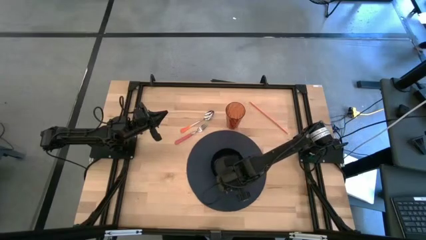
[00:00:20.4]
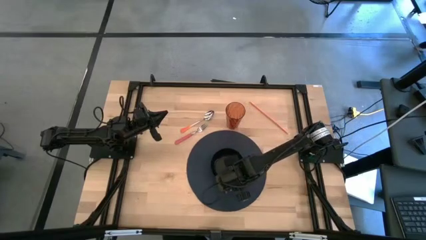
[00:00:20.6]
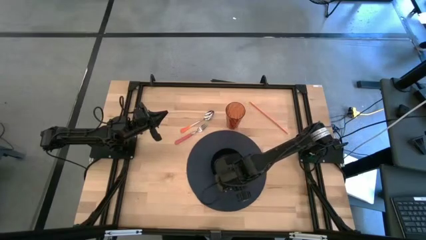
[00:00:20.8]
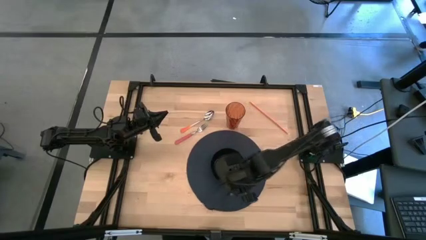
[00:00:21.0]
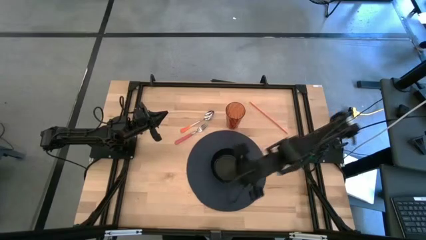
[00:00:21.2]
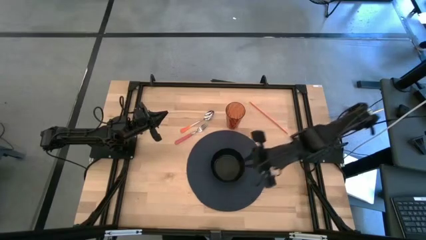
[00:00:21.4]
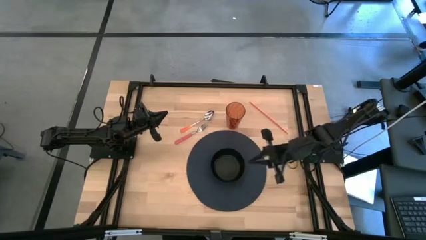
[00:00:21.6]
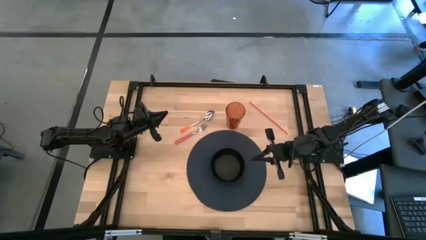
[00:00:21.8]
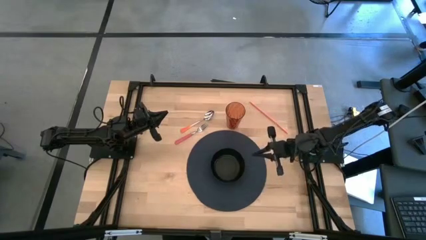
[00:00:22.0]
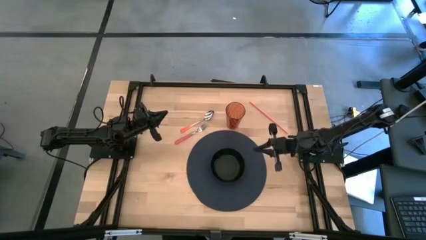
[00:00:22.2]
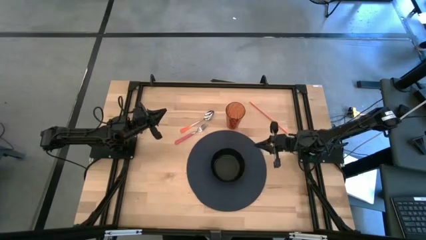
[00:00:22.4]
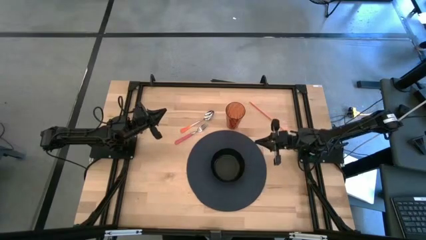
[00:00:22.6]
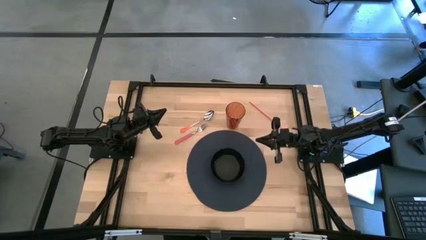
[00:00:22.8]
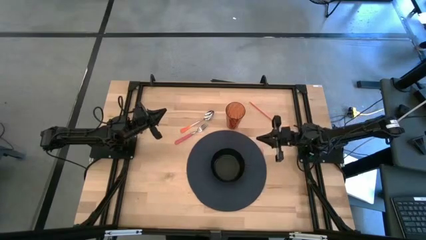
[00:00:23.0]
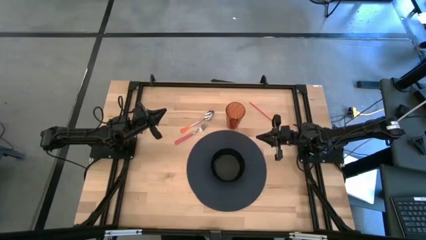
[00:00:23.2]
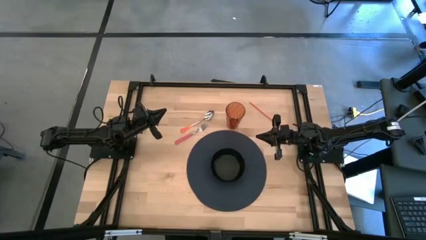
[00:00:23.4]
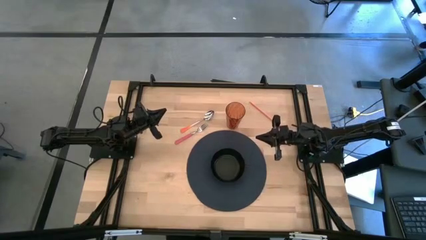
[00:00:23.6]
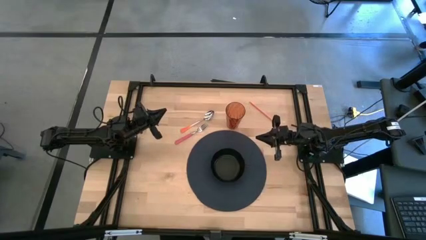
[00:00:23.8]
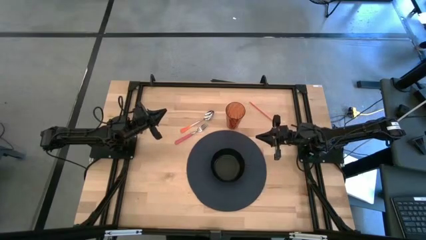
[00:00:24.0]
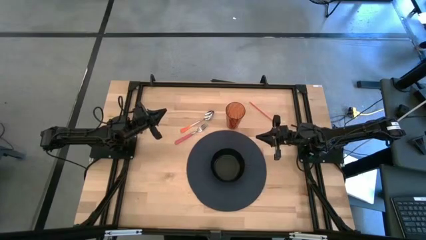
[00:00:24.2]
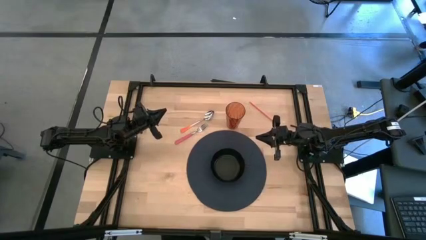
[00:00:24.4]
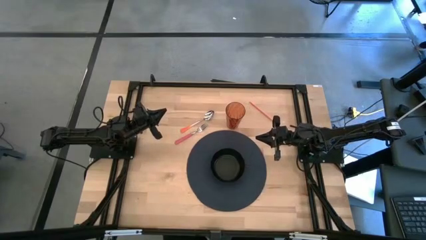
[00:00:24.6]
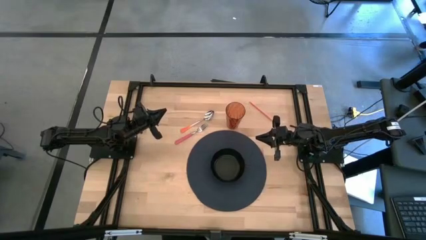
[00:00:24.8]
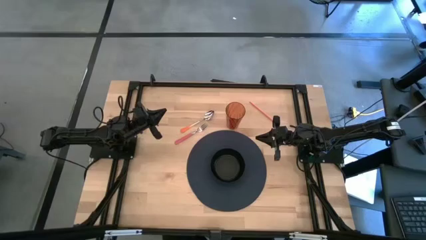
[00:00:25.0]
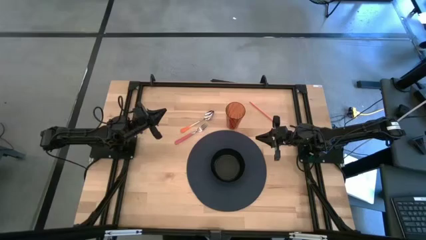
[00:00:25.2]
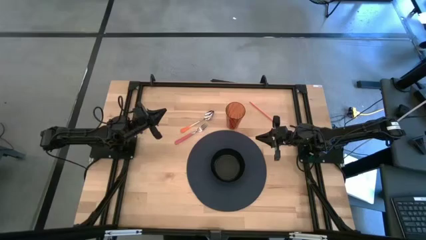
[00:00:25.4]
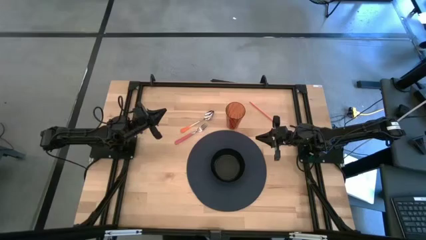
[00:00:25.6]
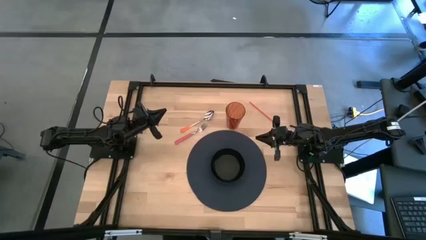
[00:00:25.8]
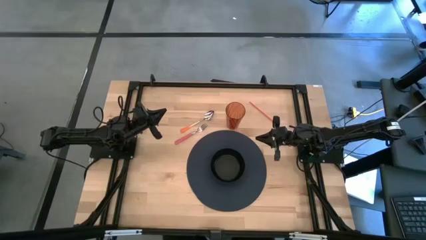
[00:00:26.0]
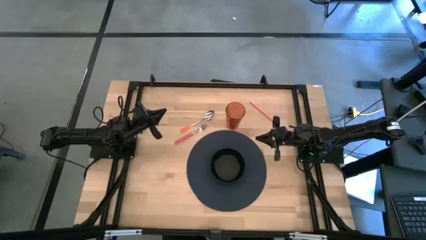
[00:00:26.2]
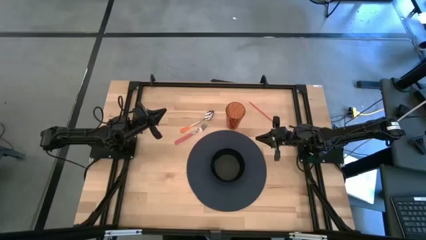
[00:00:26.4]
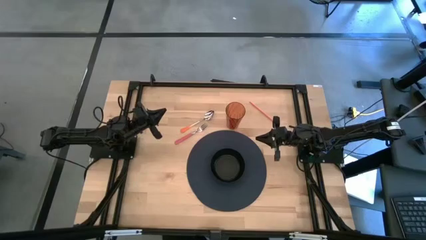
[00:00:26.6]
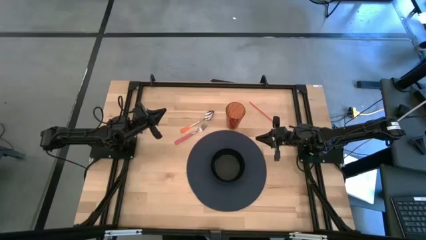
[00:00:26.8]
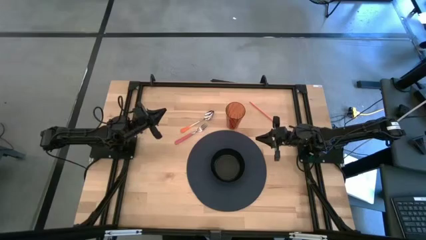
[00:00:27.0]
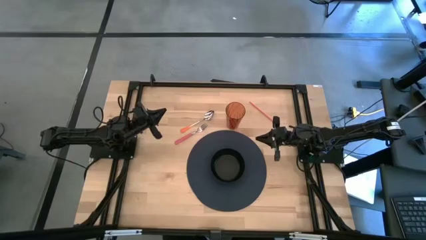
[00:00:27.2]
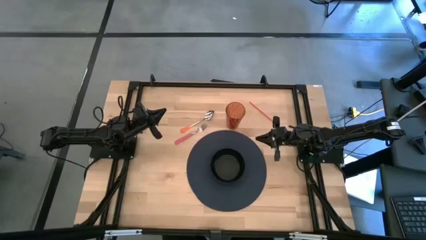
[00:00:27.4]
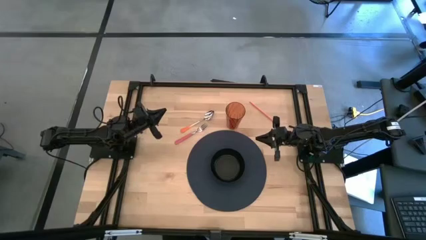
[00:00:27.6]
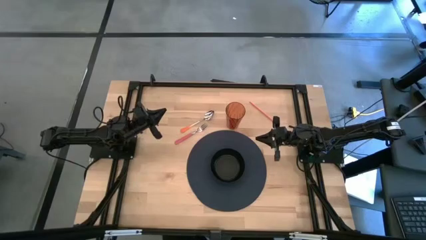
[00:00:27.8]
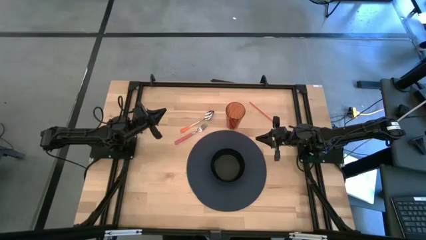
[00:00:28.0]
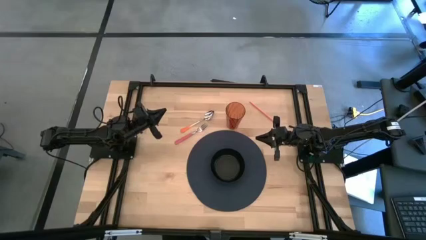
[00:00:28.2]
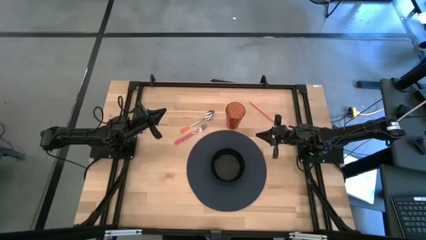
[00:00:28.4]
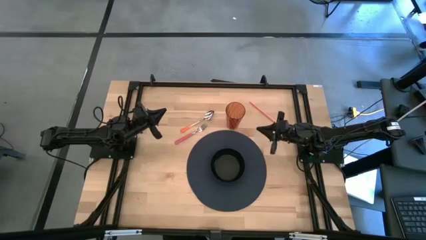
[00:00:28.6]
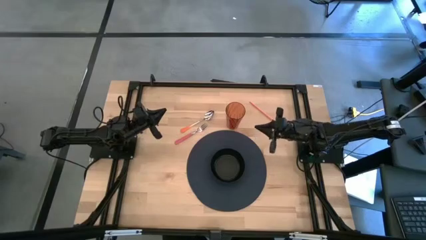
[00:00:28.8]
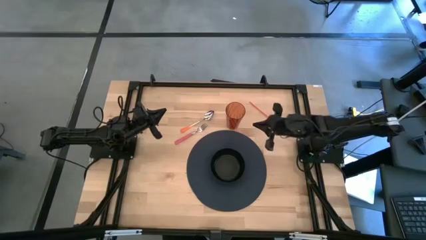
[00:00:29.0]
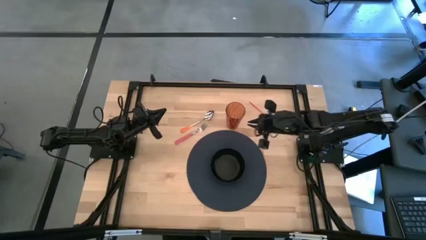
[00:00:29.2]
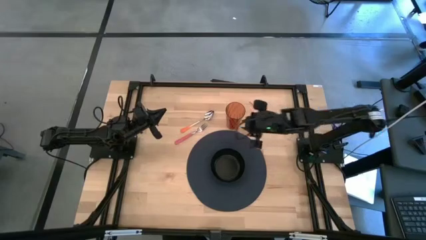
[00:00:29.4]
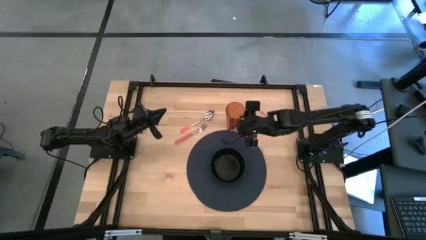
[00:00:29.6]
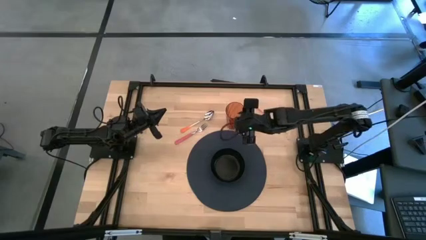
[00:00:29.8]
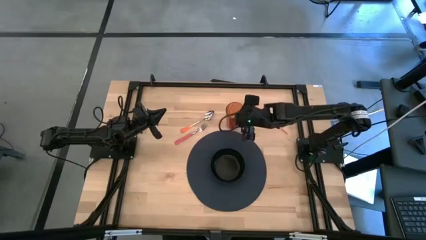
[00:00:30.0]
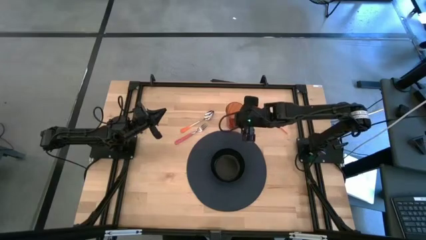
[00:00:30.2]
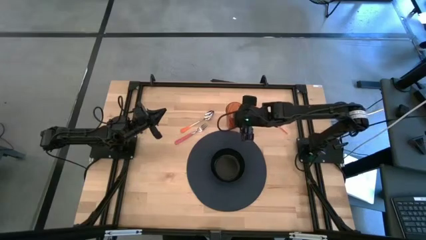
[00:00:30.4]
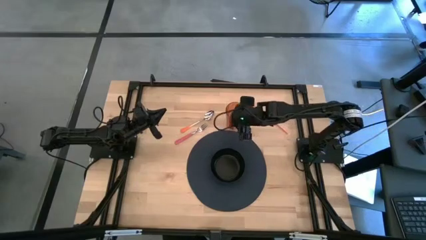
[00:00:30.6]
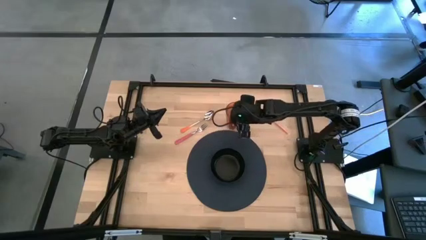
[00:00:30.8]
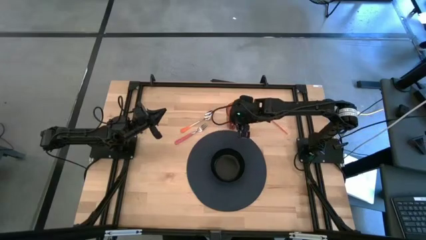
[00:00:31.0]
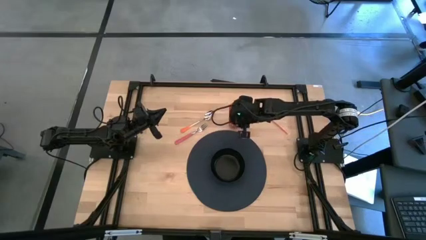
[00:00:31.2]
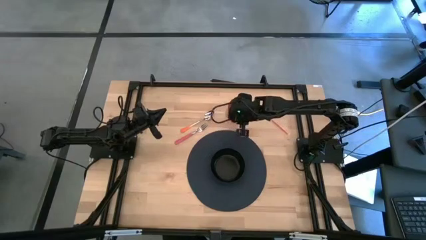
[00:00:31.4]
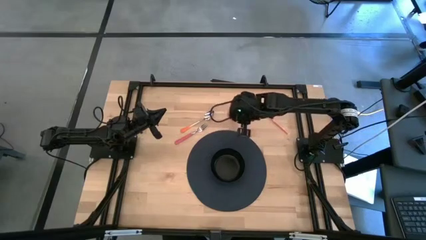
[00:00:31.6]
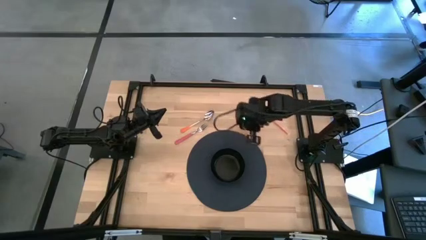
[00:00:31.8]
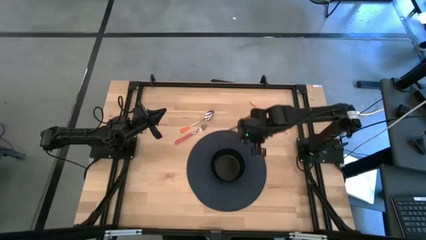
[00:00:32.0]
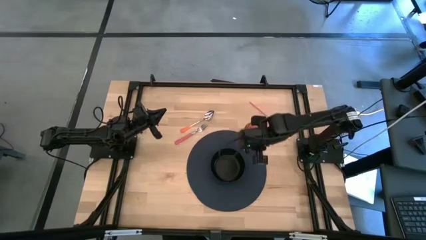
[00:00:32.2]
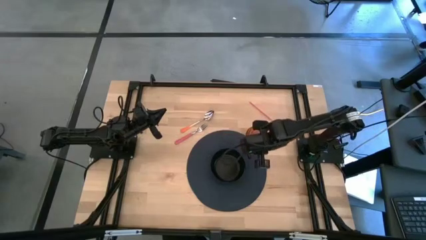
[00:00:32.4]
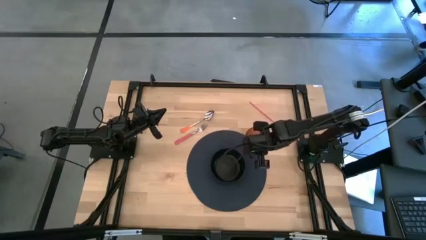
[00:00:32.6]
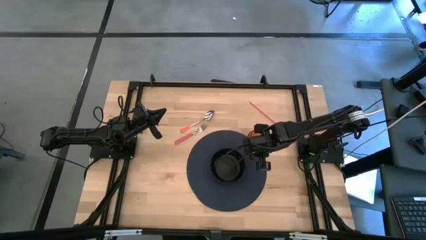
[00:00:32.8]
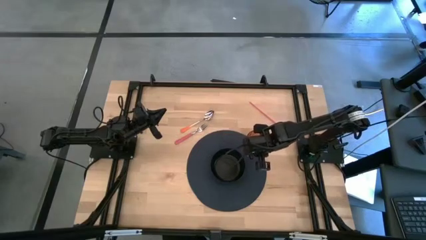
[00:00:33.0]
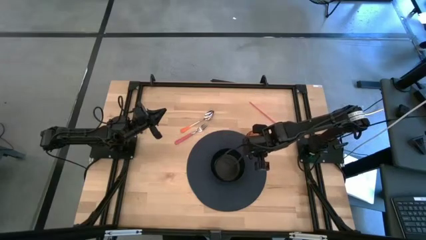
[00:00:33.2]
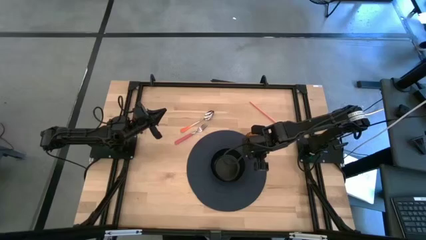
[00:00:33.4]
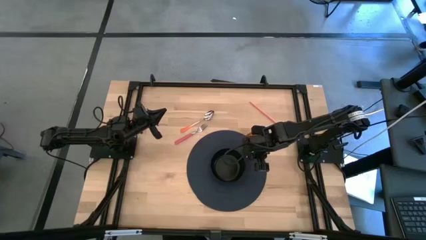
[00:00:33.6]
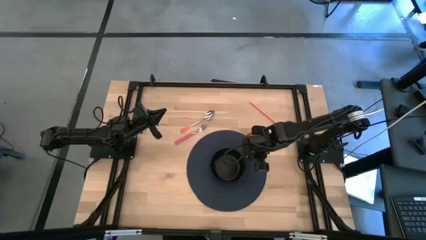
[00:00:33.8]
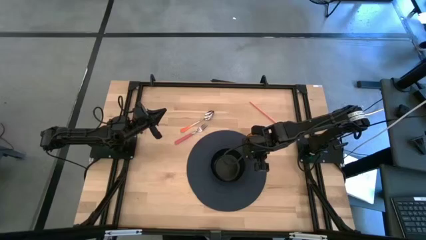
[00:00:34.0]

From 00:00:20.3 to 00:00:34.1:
Task: Pick & Place Utensil
Put the brown cup at the top right of the black table mat
